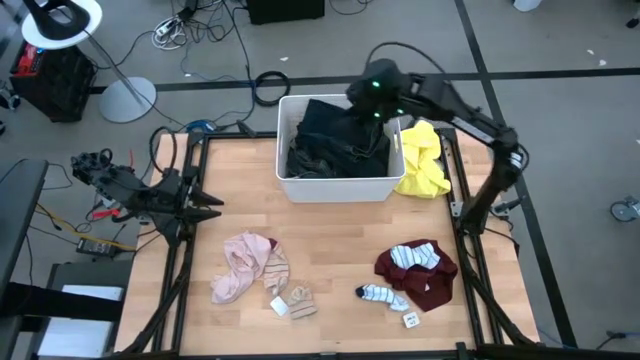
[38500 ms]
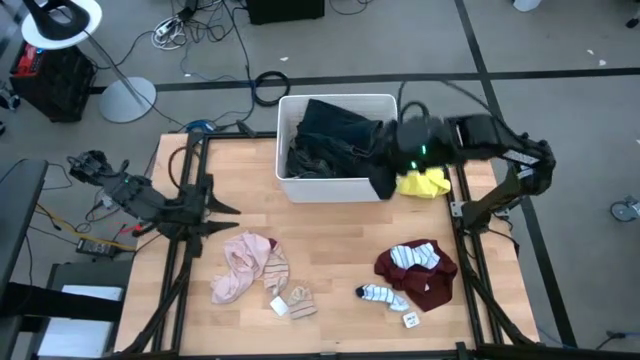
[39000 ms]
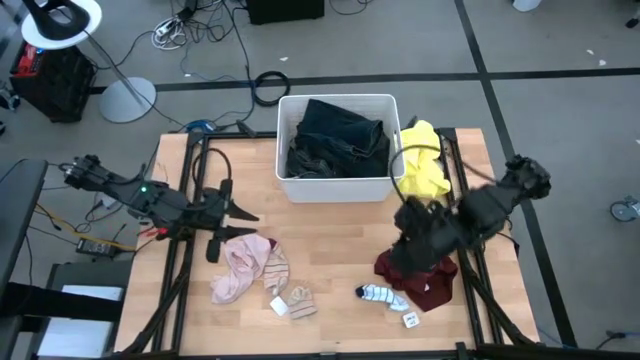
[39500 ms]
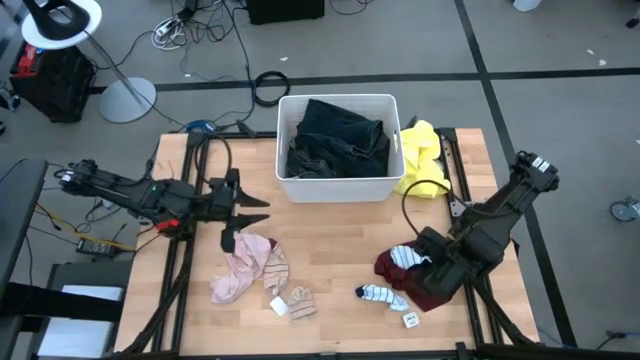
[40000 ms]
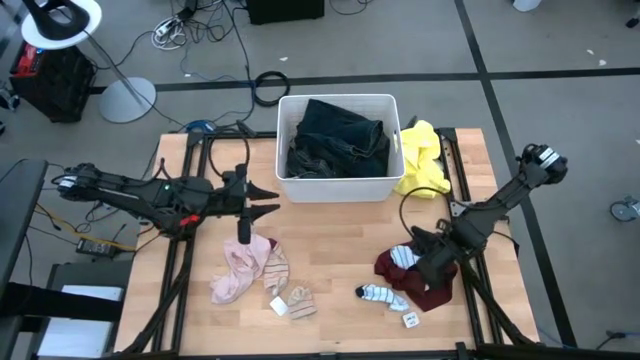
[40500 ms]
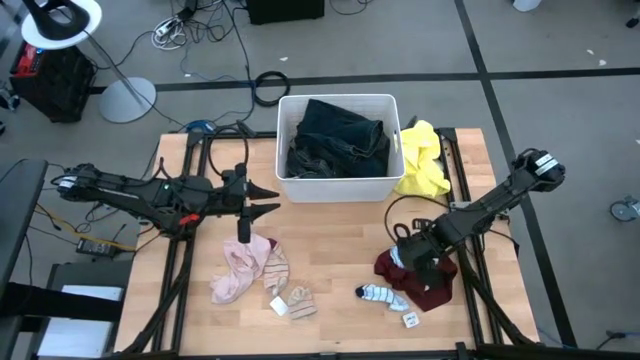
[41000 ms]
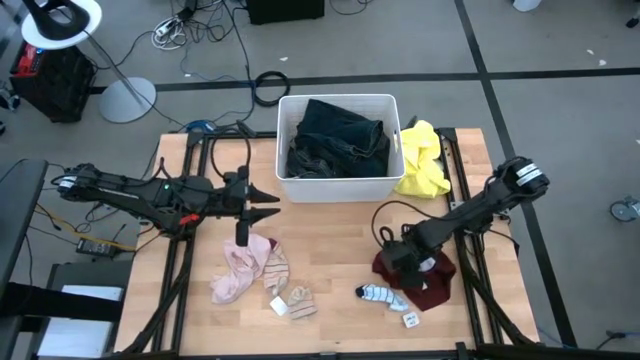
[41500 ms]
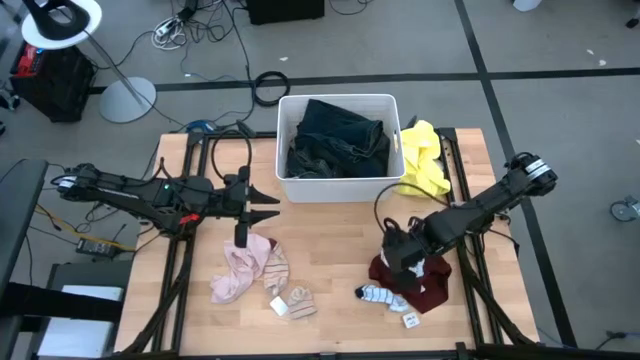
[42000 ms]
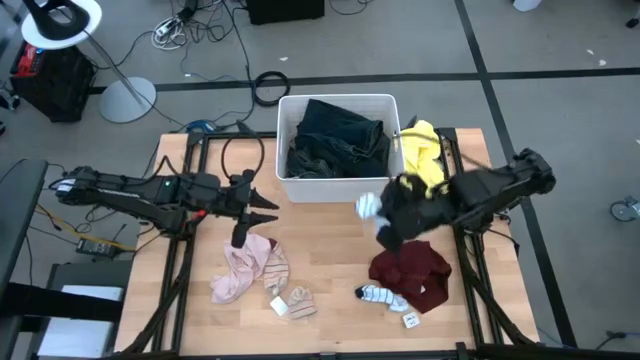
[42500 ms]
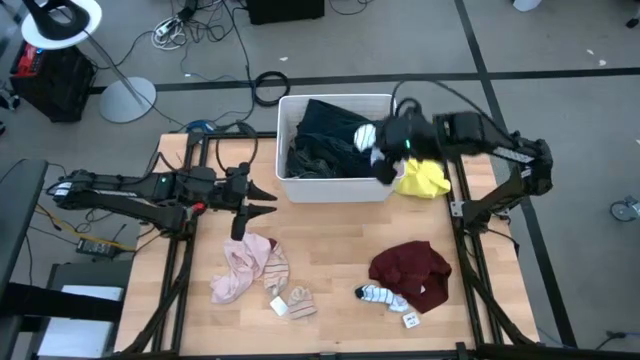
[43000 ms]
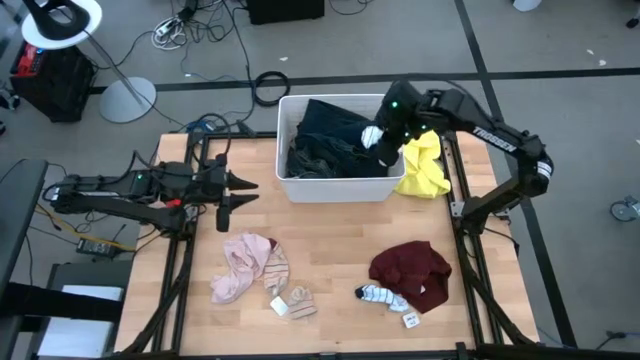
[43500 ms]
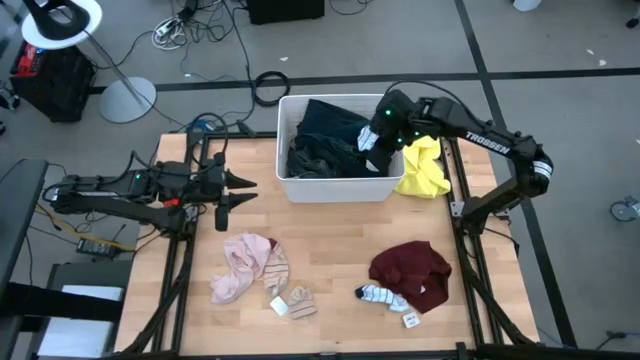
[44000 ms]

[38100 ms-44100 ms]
Task: Sort clothes
Put the top white sock into the white laundry bin

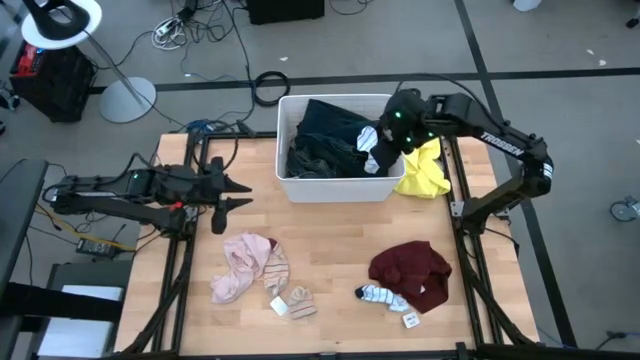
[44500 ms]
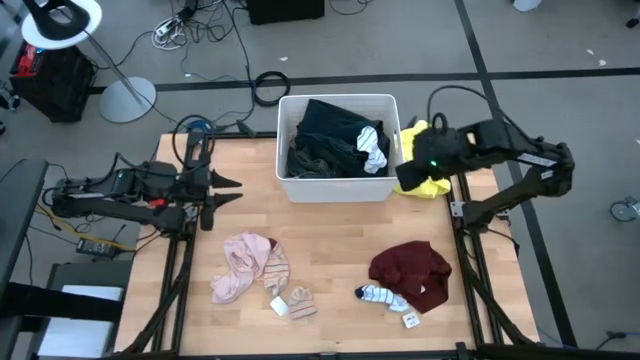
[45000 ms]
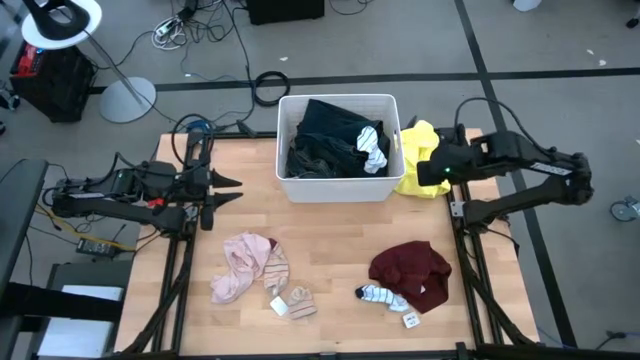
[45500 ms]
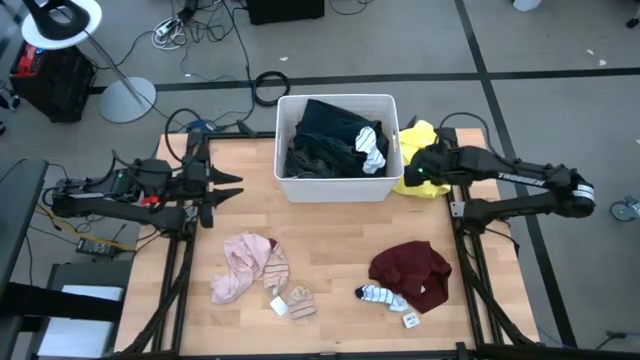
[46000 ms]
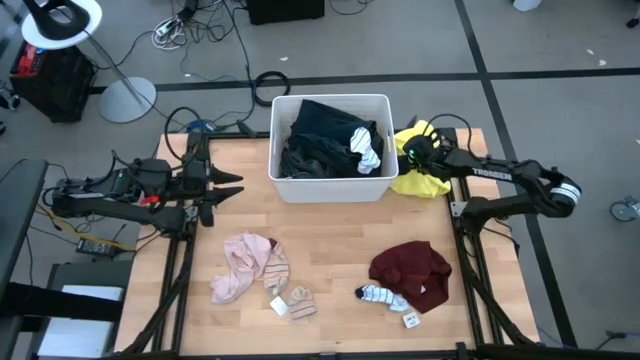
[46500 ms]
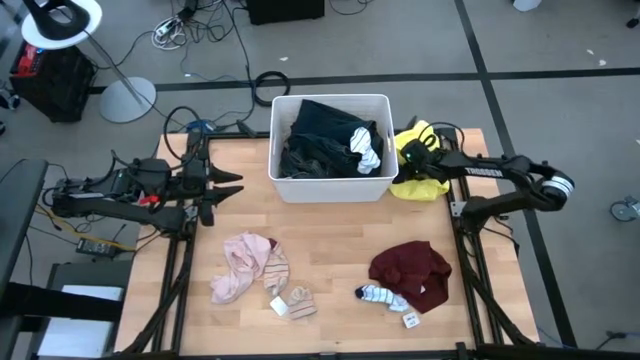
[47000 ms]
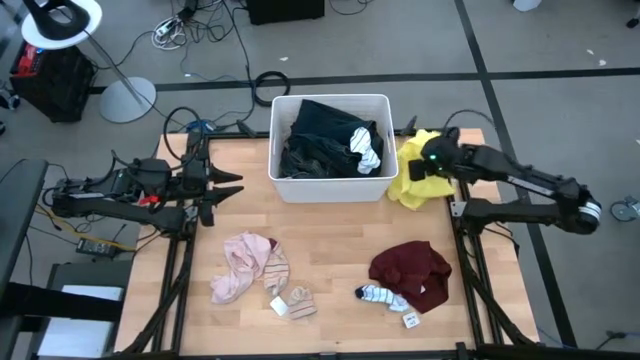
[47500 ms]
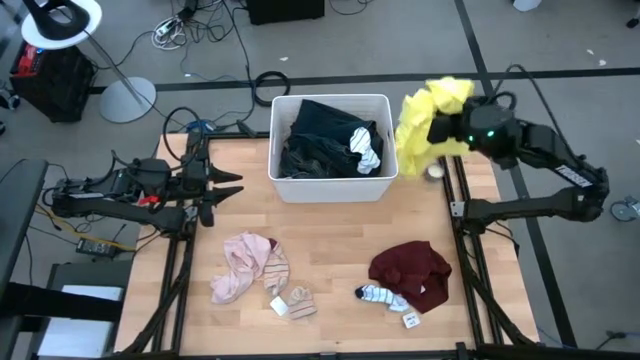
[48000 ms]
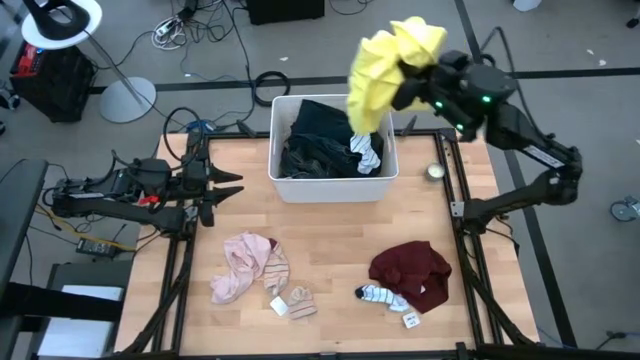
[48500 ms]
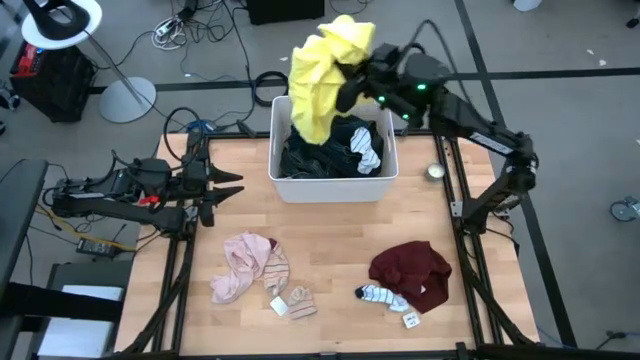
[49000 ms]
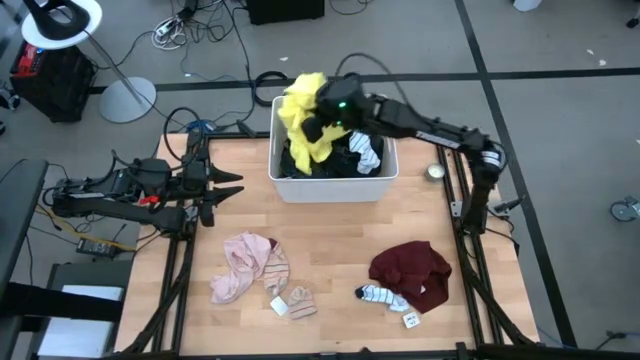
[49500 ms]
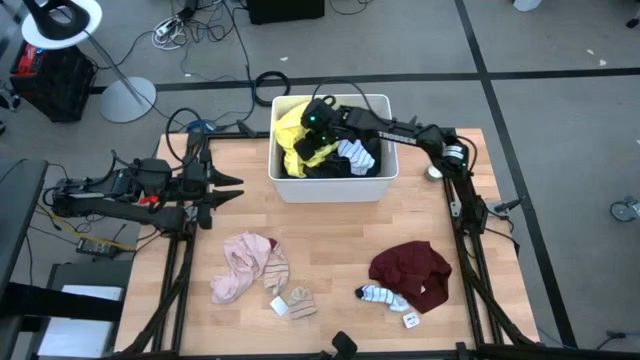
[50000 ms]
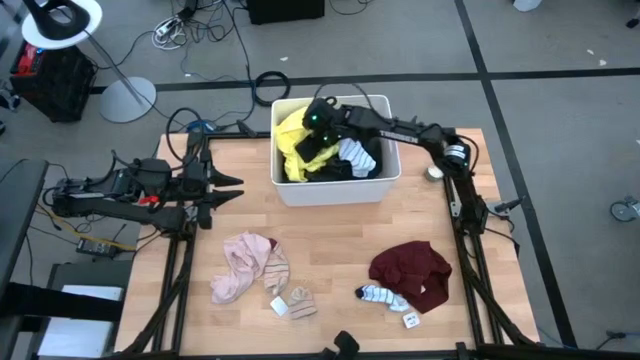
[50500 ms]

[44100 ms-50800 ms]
Put the yellow shirt into the white laundry bin

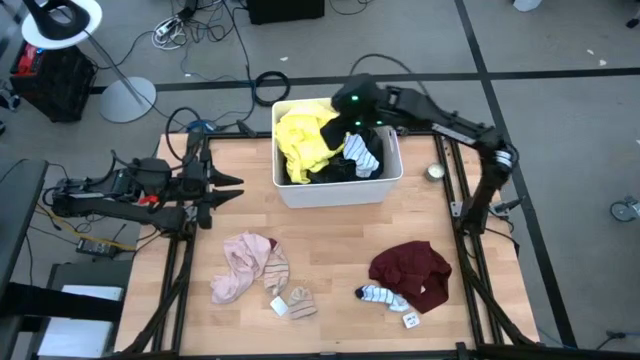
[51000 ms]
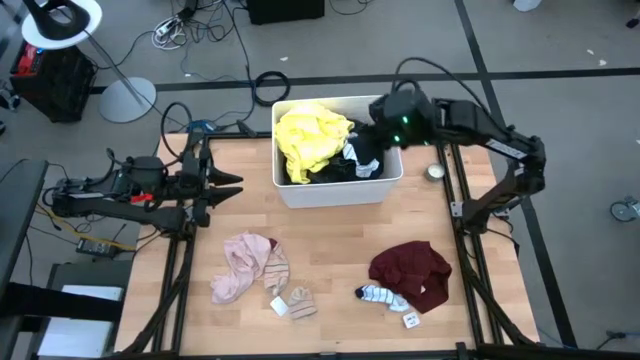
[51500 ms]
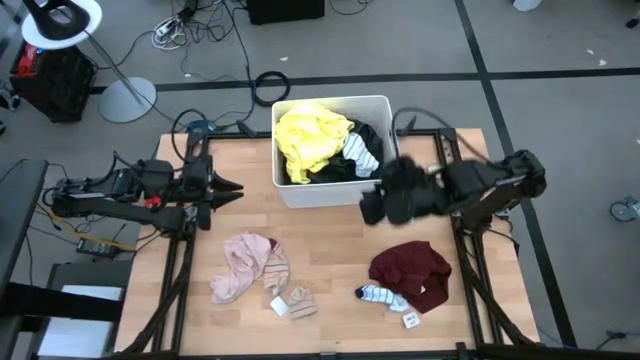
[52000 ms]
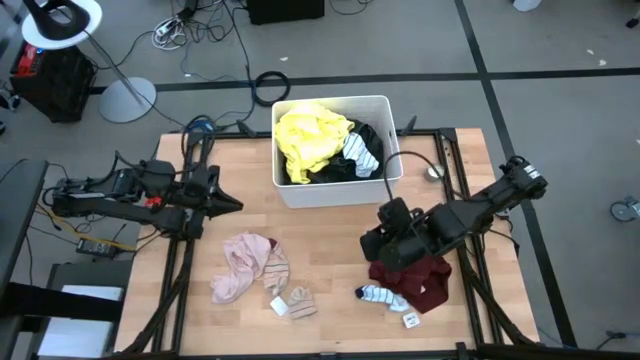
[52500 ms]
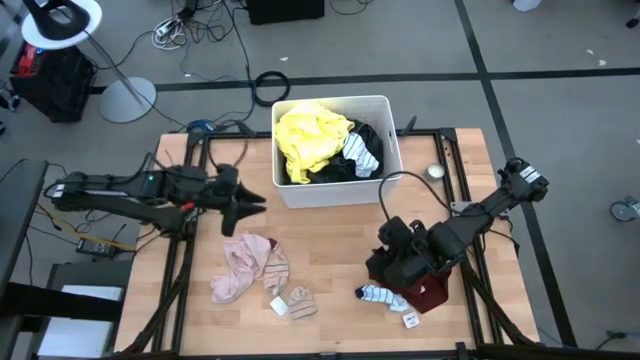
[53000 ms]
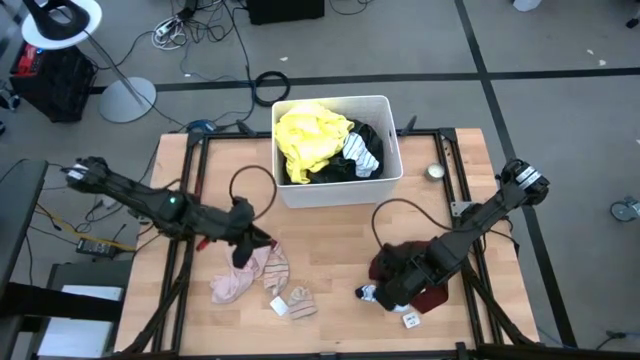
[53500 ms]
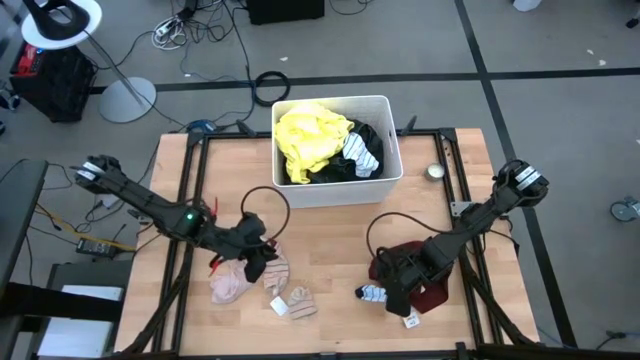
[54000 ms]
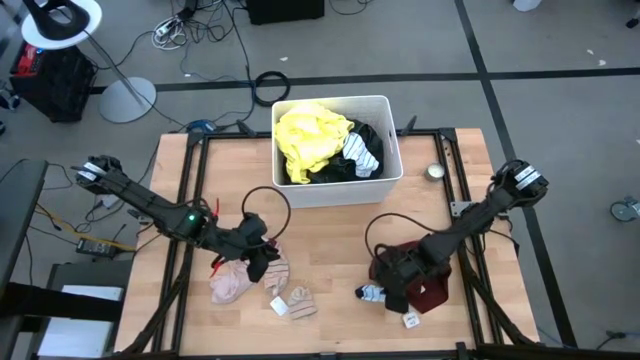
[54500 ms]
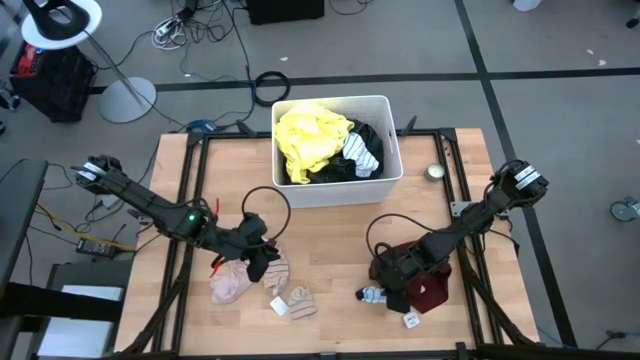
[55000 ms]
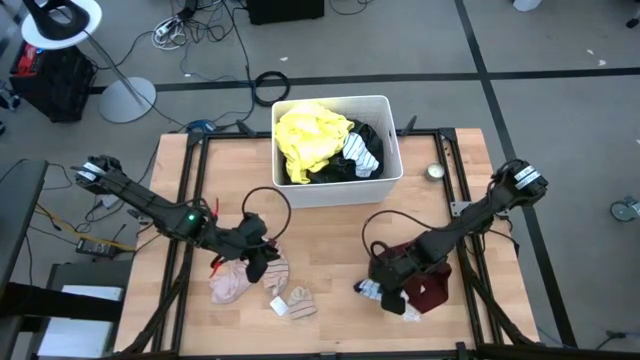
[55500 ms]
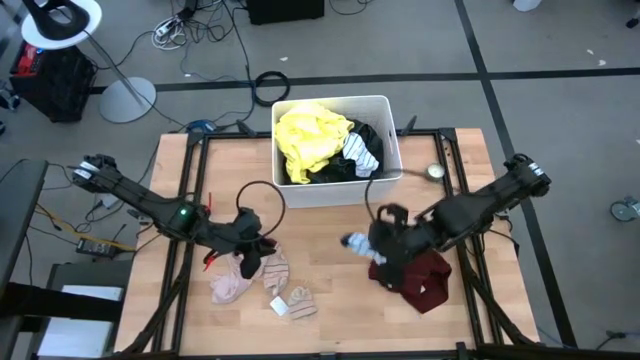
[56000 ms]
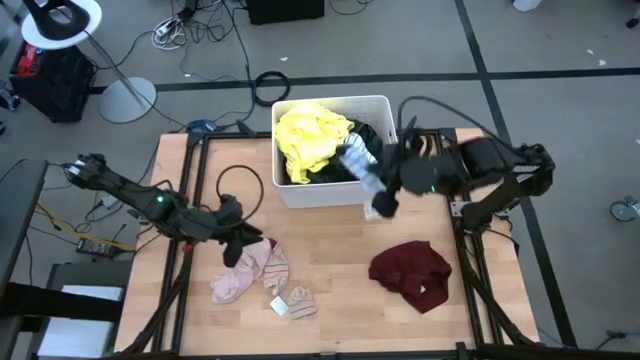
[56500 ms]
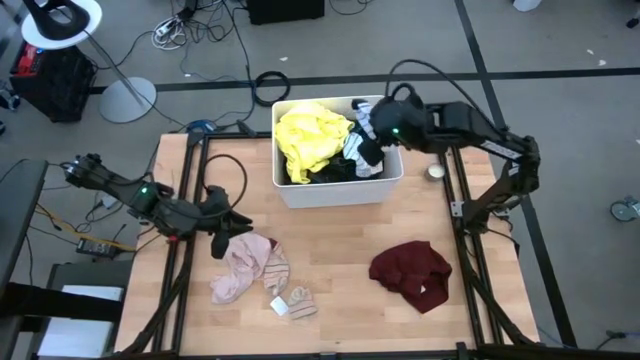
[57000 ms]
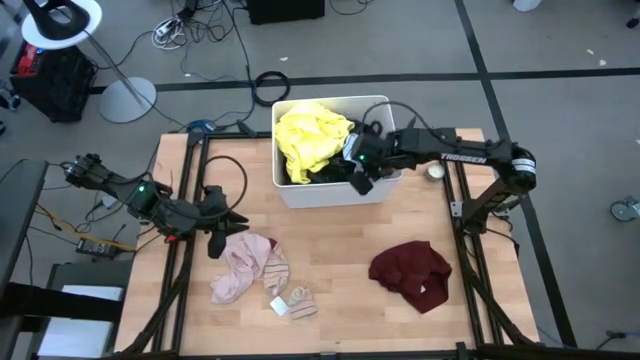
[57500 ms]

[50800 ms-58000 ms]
Put the white sock into the white laundry bin

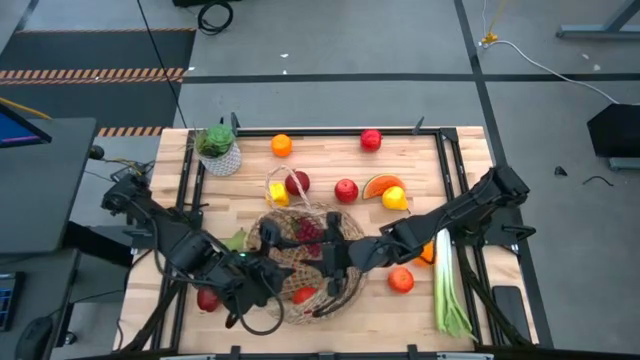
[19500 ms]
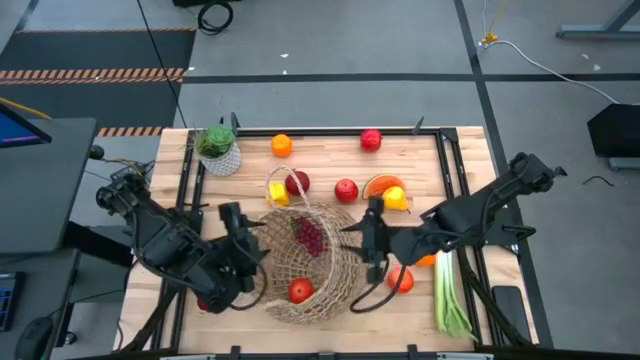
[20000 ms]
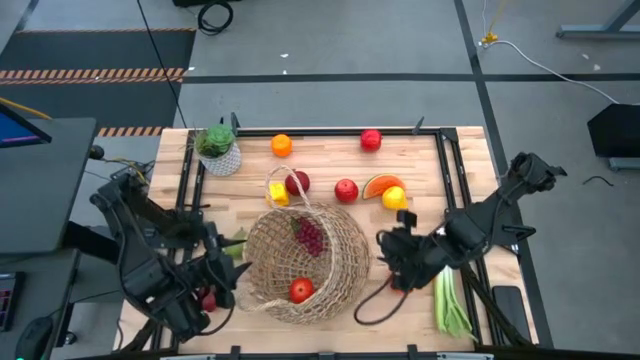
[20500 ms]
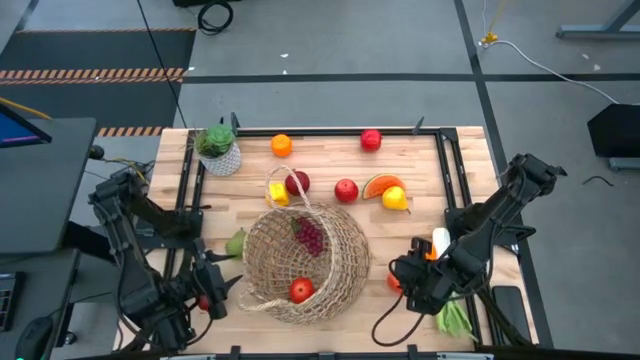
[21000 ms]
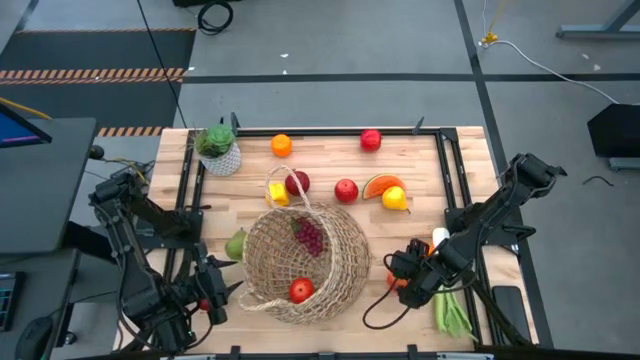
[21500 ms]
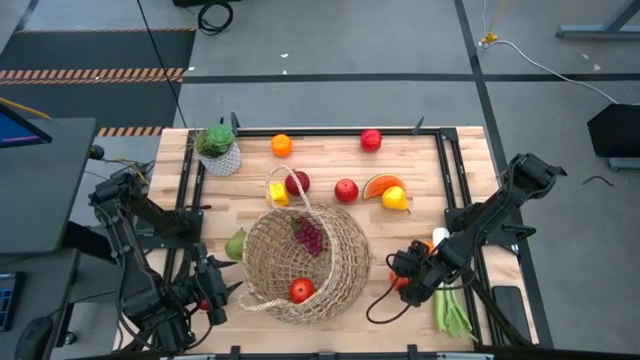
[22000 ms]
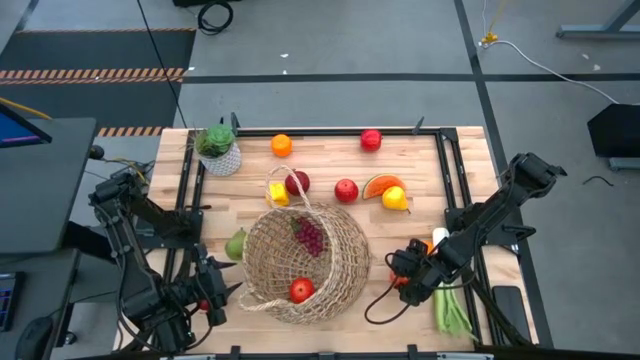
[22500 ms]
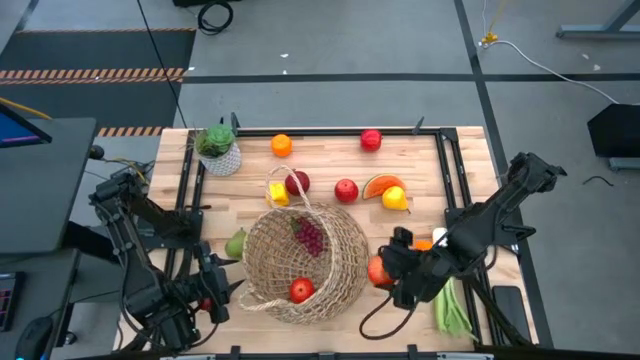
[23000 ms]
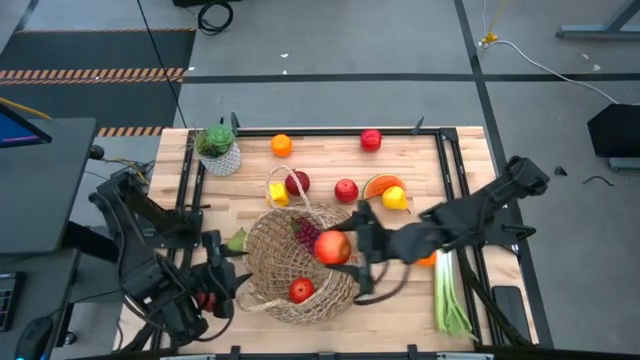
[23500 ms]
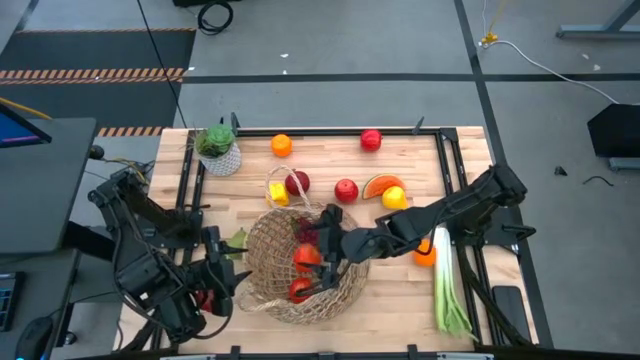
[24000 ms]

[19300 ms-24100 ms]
Task: Build produce basket
Put the apple into the basket
